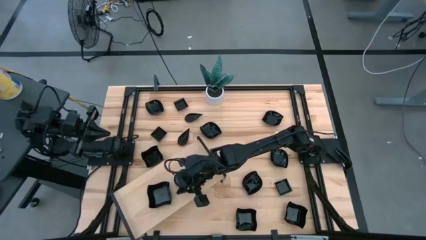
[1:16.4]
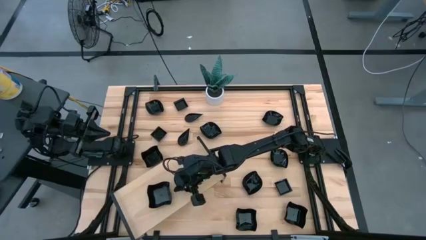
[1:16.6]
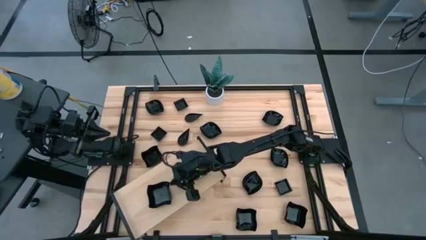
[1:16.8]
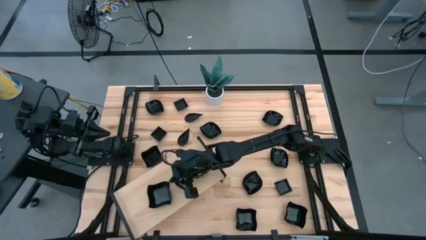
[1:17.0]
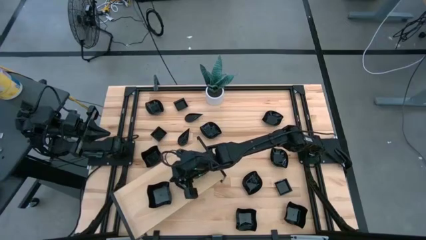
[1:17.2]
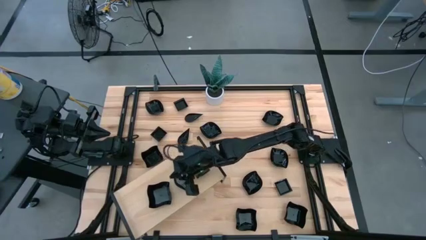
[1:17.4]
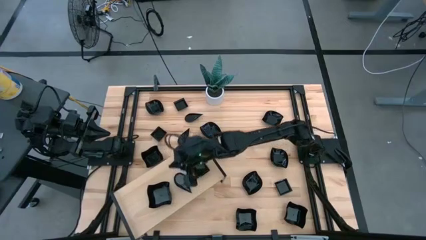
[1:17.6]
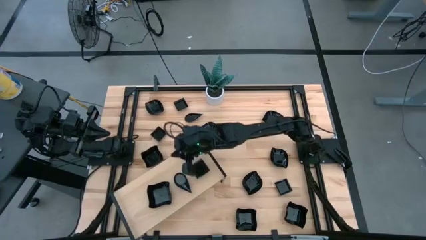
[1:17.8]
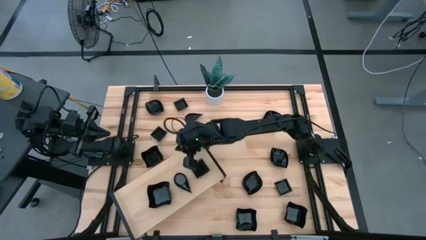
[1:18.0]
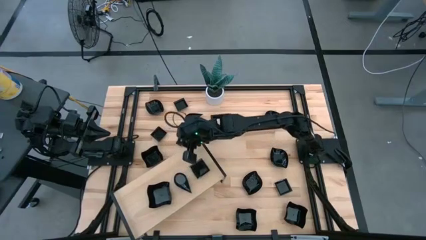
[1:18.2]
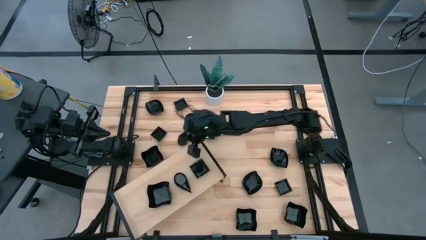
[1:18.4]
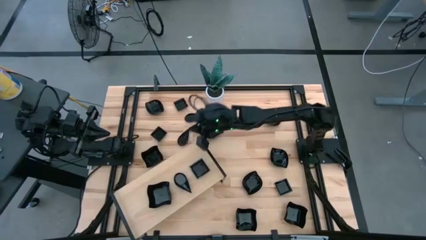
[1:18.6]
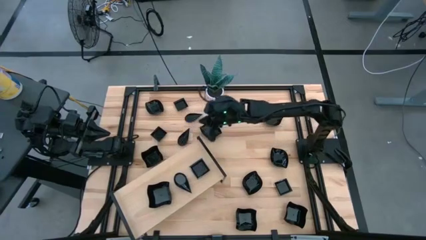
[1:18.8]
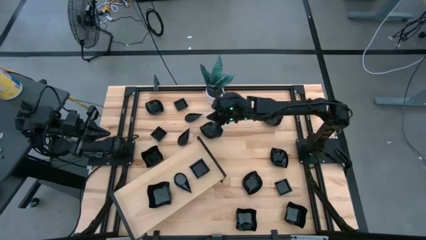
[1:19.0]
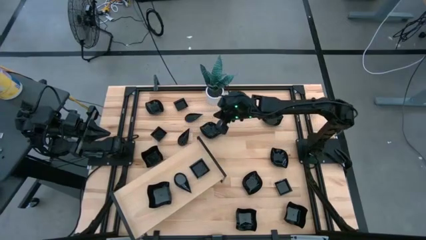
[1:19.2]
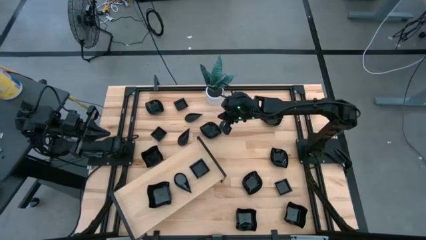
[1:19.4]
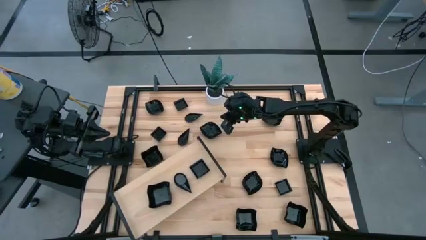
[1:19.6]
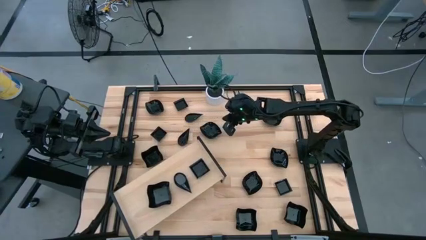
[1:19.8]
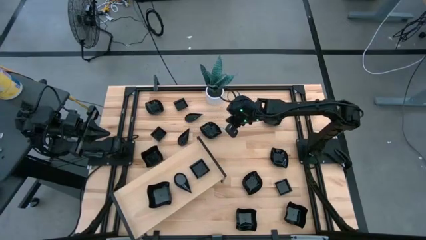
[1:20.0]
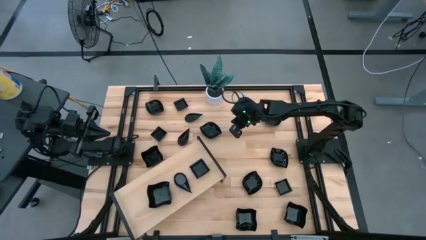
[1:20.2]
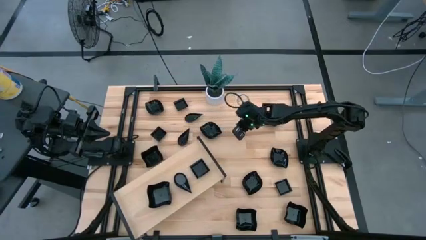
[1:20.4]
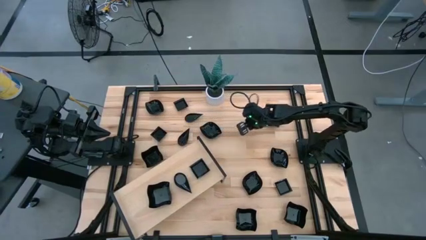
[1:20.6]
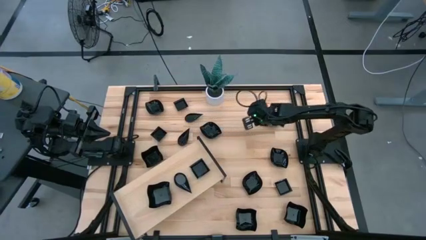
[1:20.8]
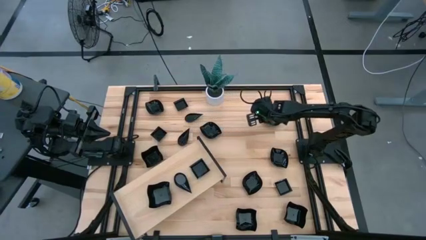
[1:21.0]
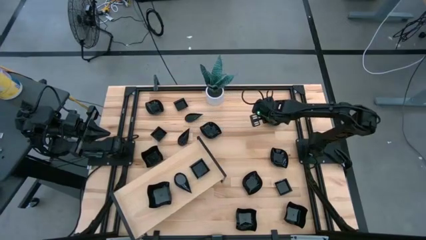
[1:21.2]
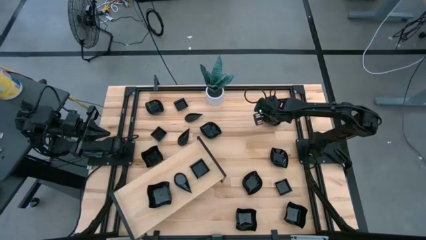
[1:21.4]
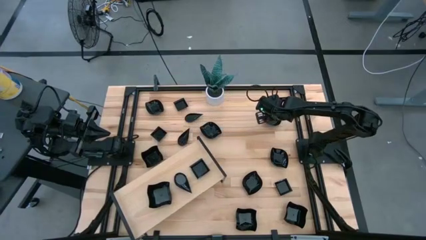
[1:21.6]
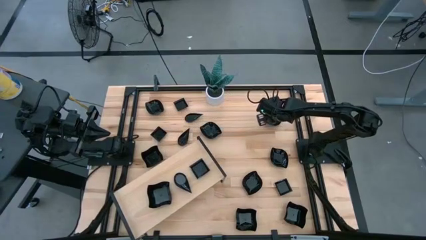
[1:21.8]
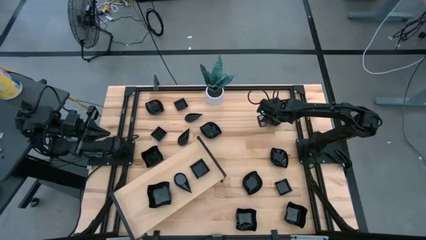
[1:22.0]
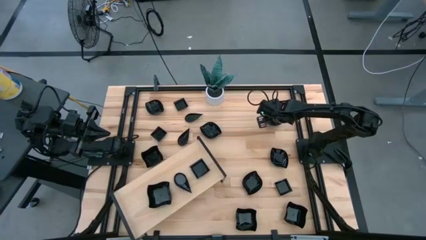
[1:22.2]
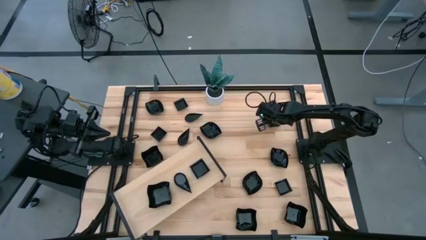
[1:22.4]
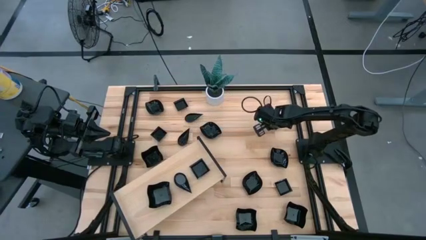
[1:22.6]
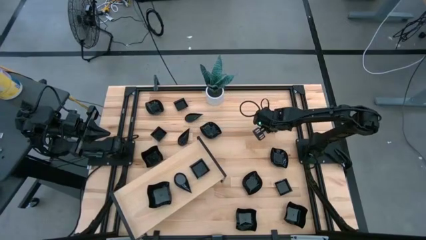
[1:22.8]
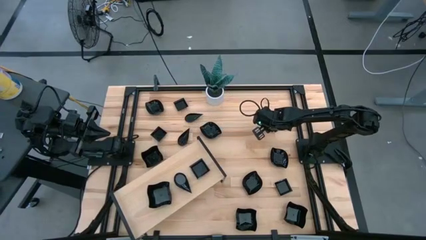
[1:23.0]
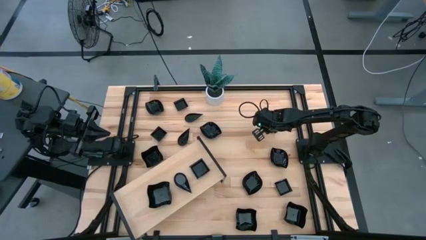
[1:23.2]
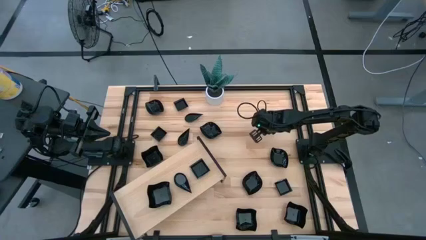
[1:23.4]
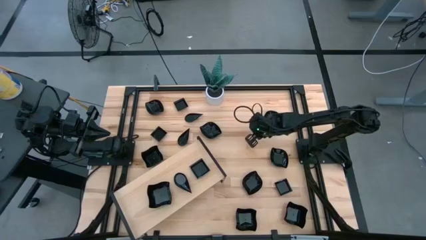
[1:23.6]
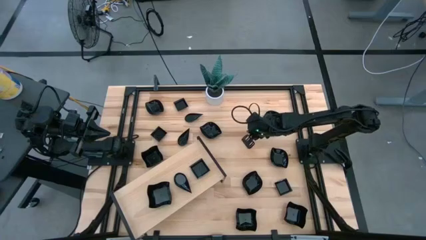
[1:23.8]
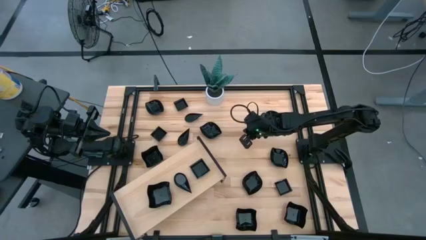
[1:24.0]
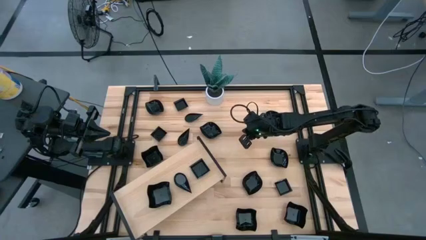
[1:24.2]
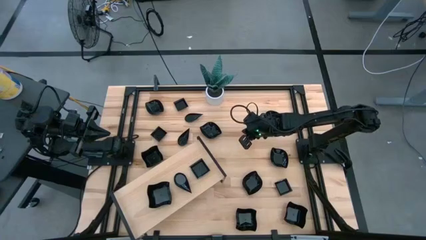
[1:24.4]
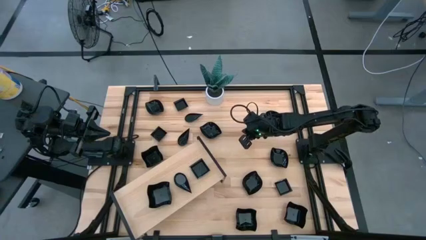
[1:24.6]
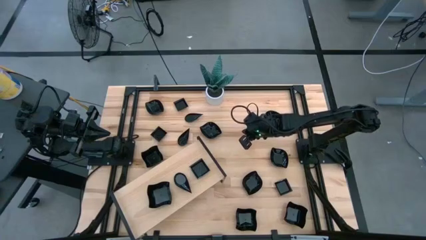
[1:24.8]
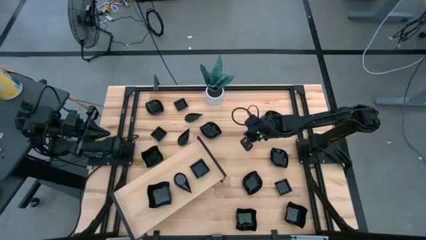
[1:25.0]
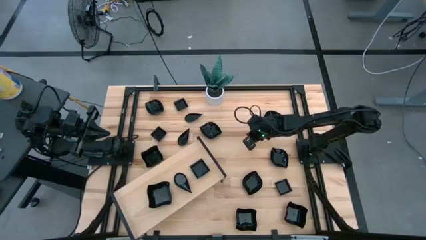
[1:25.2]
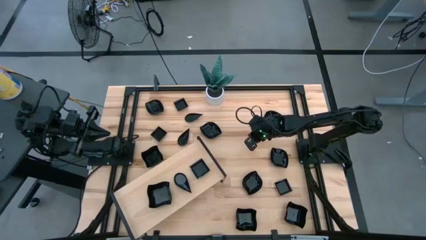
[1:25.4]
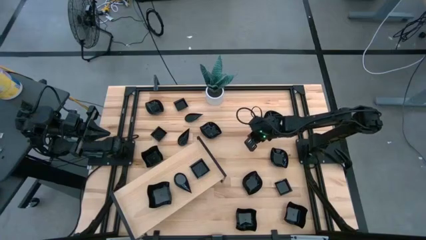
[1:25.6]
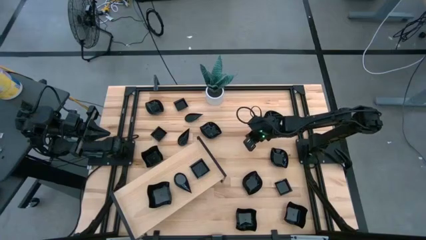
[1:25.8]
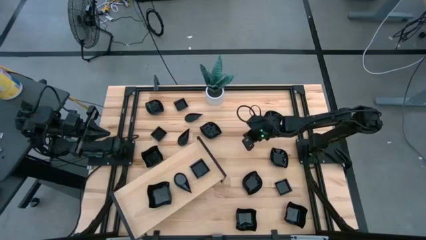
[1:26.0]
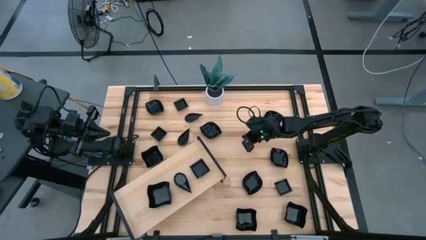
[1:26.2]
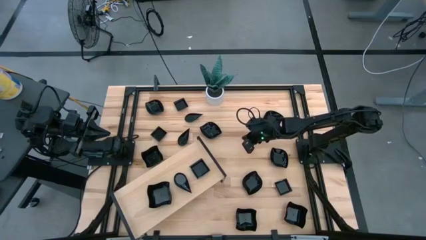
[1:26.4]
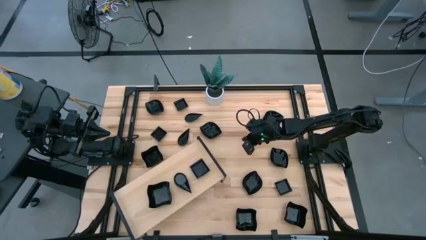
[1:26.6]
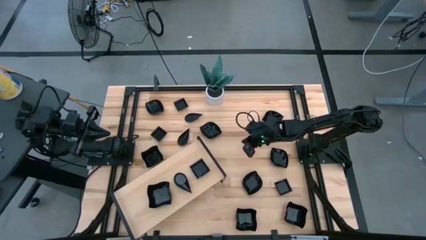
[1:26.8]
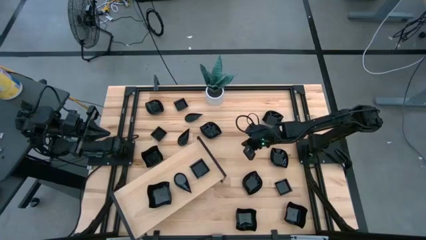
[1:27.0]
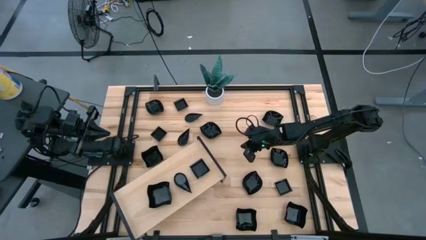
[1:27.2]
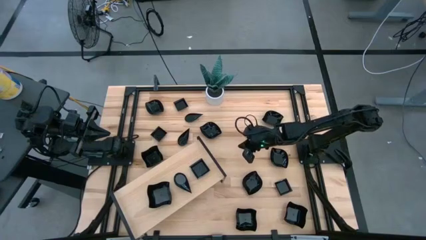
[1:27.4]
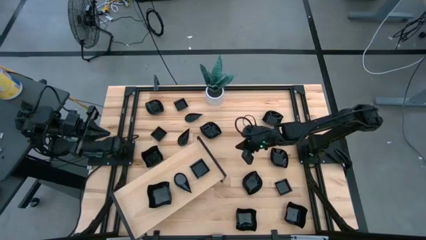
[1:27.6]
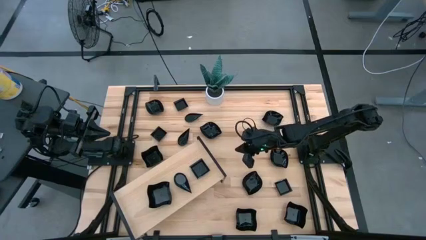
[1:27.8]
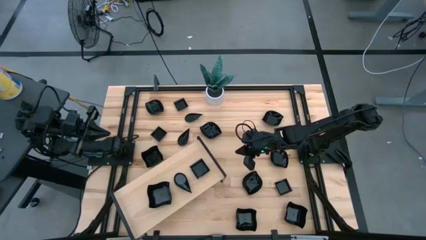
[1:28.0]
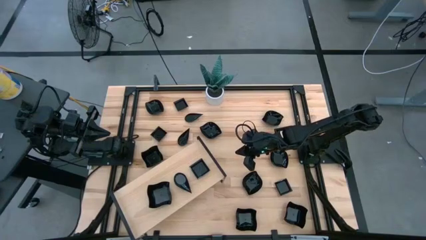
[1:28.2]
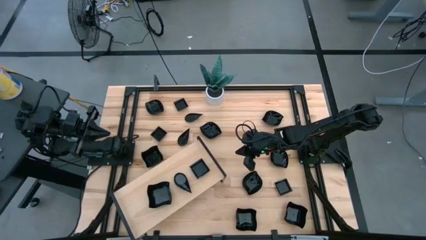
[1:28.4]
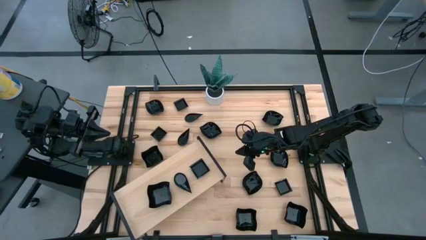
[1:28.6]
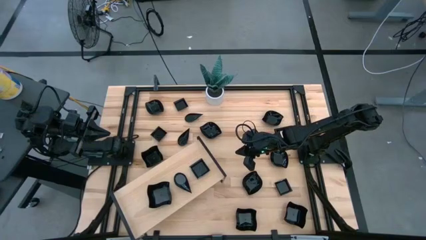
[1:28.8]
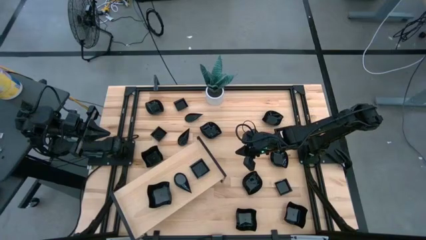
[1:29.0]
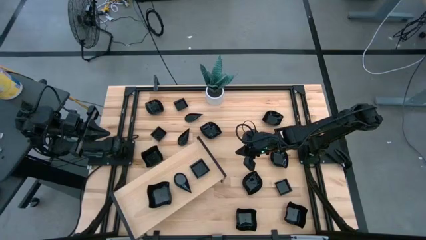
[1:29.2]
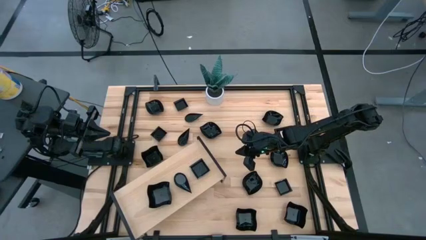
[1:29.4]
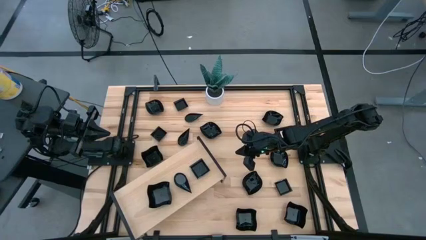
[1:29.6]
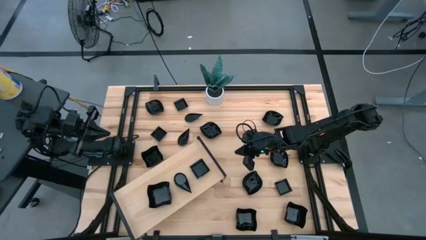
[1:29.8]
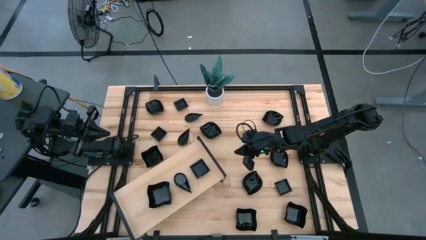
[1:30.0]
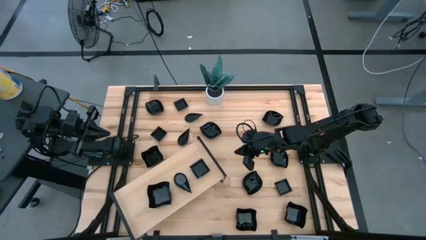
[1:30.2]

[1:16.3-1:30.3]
Task: Pick & Place Mini shaped plates
Put the black distorted square plate on the shelf

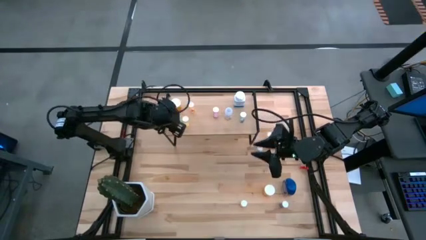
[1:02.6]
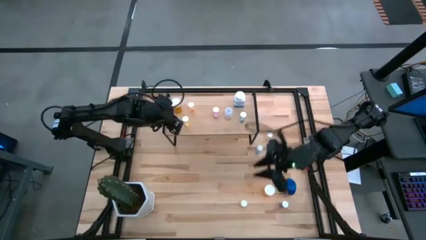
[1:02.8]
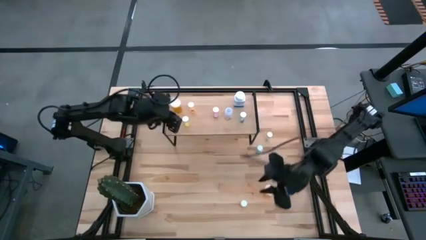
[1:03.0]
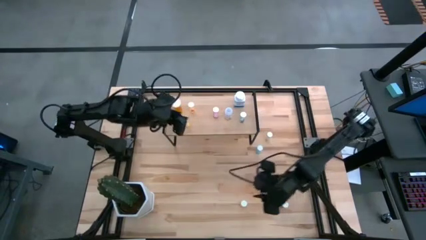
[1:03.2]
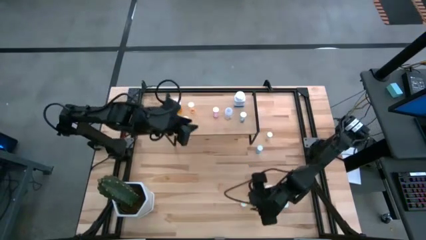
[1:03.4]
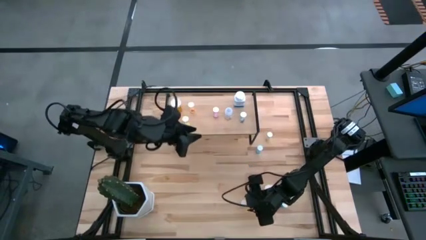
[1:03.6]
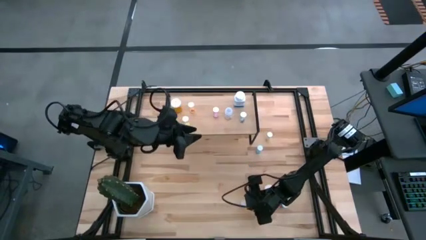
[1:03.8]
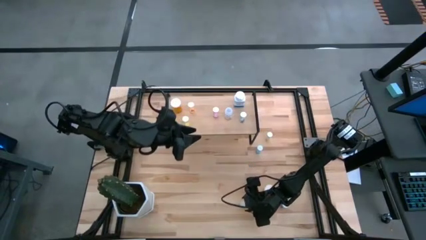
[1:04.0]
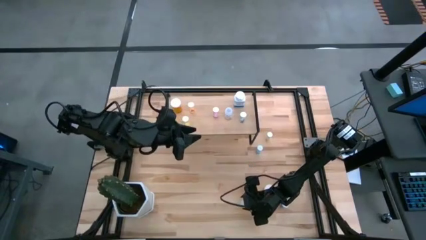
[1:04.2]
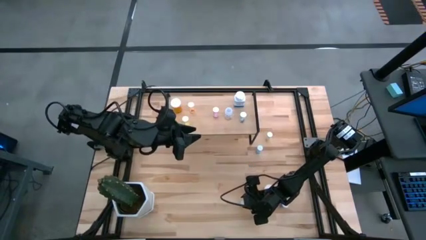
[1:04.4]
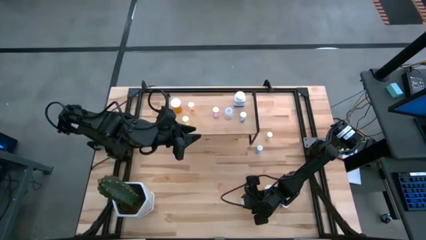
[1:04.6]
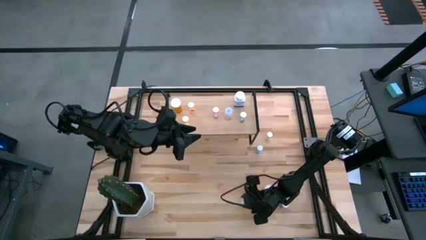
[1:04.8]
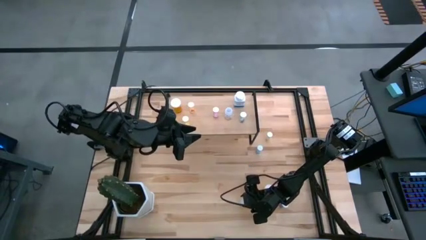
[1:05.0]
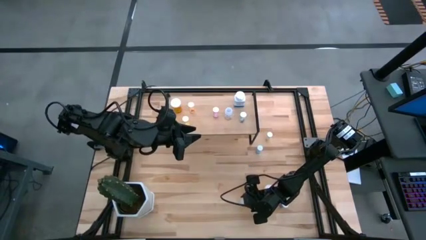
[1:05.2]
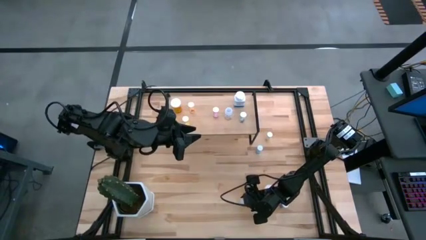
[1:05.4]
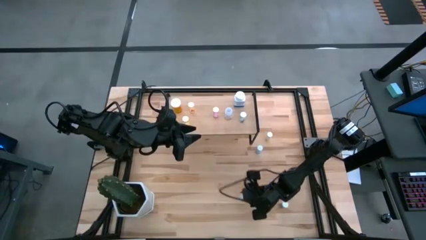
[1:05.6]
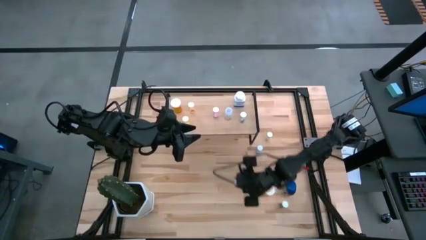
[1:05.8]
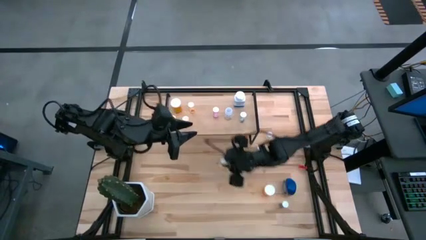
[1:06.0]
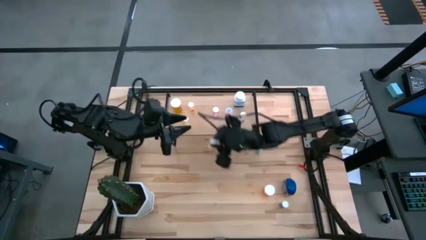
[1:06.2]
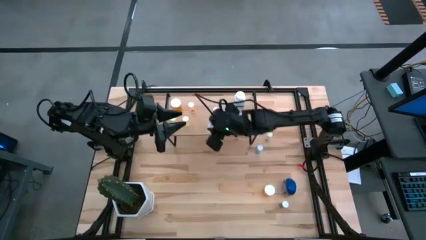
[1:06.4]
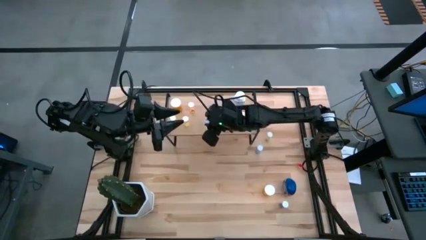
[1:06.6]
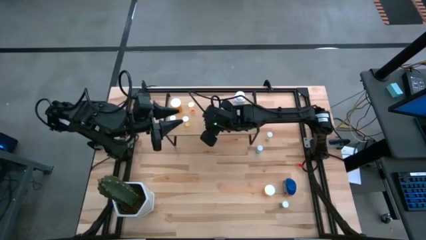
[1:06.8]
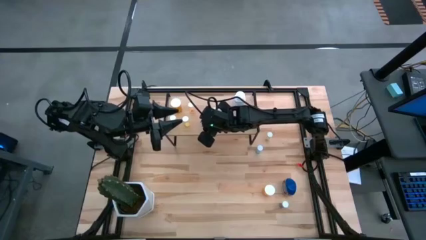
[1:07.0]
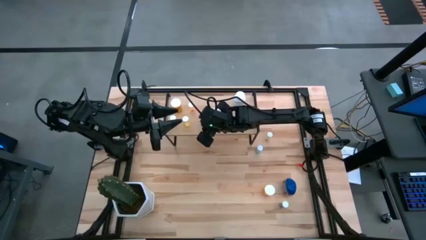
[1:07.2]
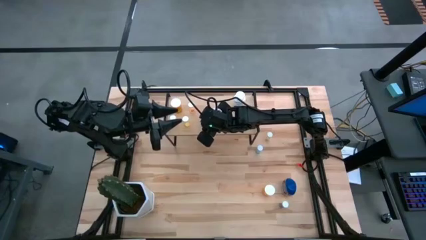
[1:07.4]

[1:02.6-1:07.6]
Task: Pick and place medicine bottles onto shelf by color
Put the yellow pill bottle on the shelf
